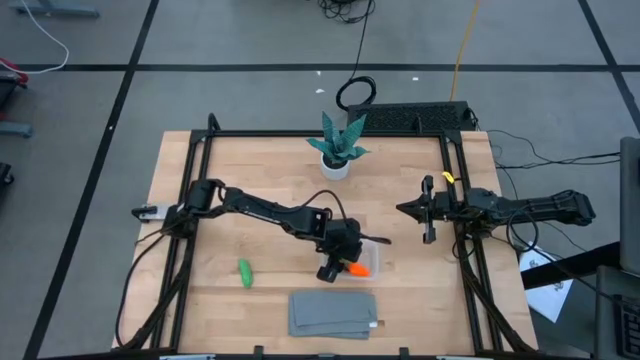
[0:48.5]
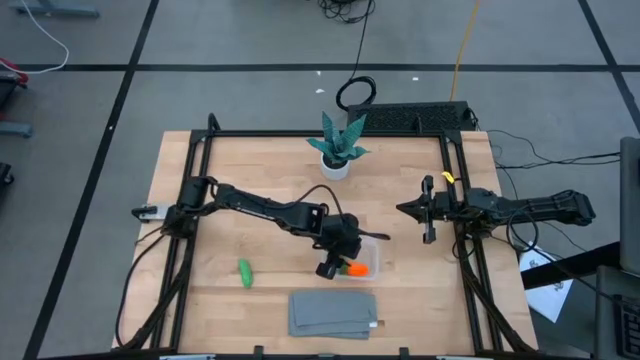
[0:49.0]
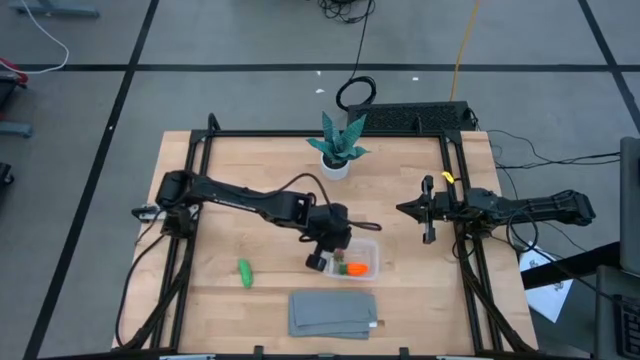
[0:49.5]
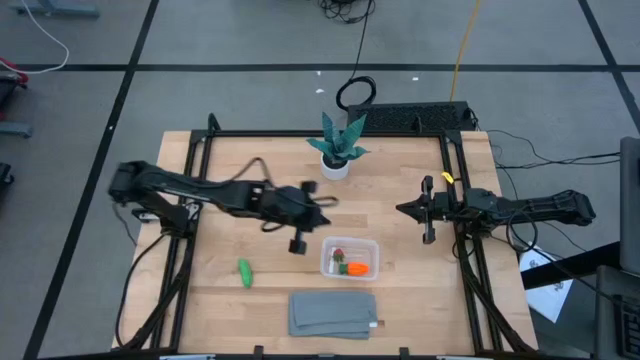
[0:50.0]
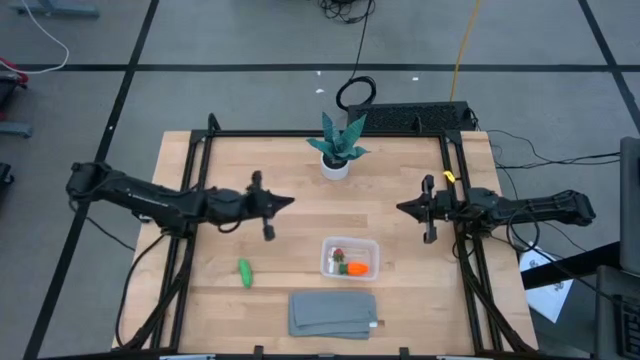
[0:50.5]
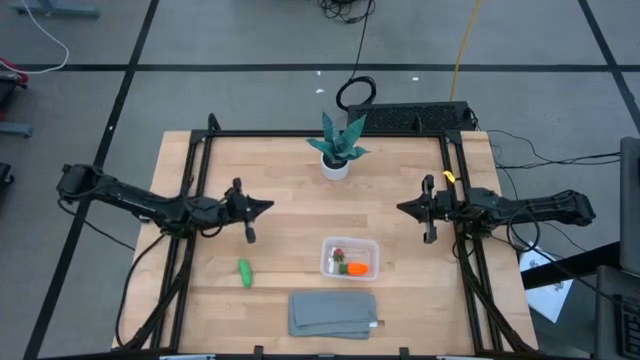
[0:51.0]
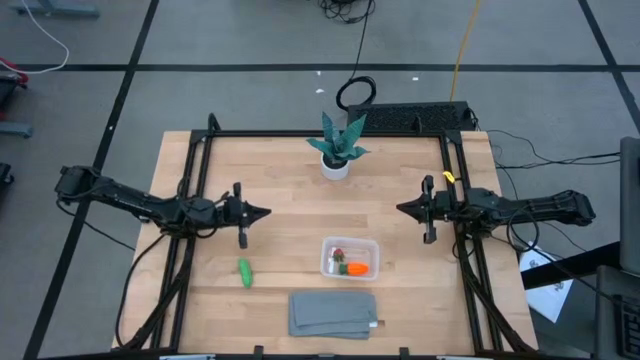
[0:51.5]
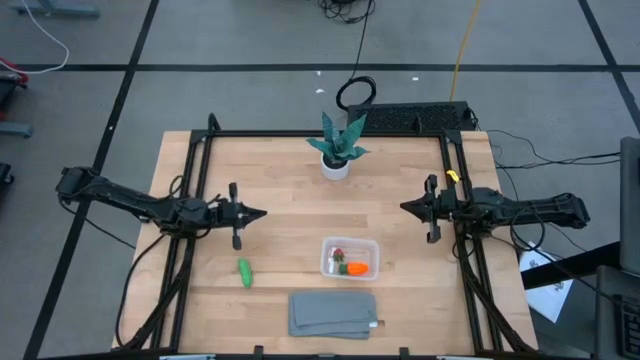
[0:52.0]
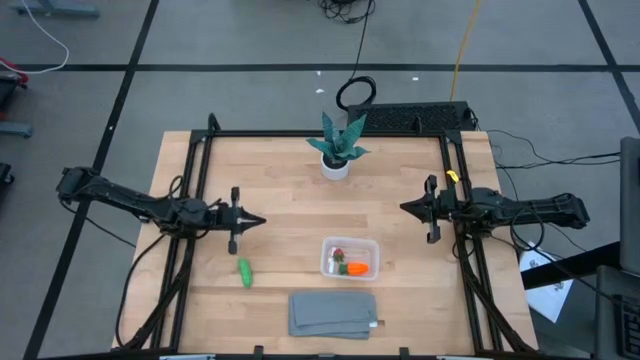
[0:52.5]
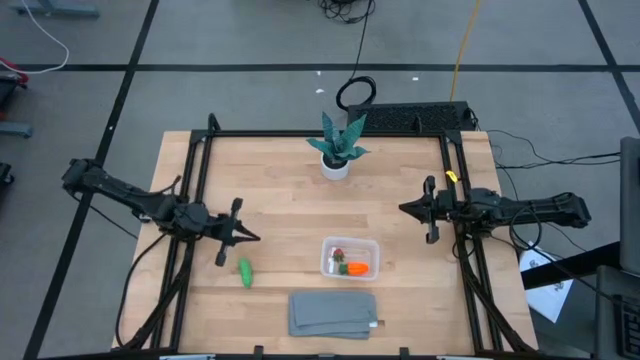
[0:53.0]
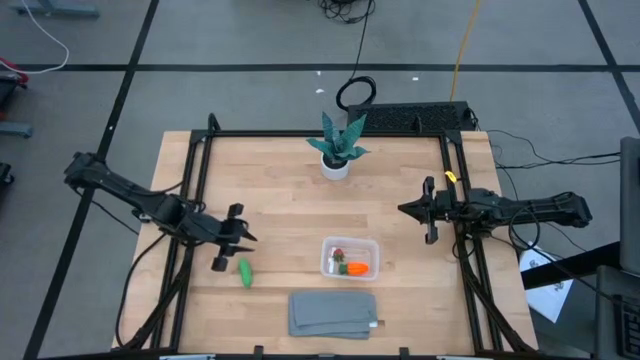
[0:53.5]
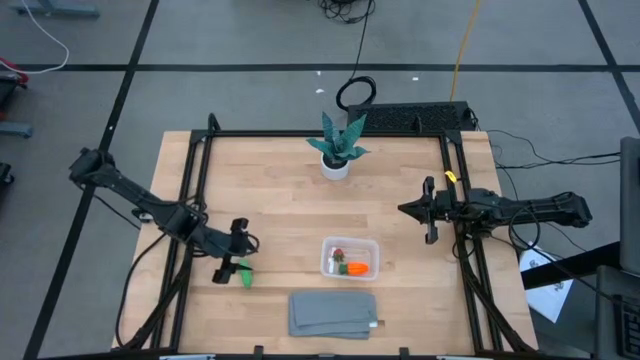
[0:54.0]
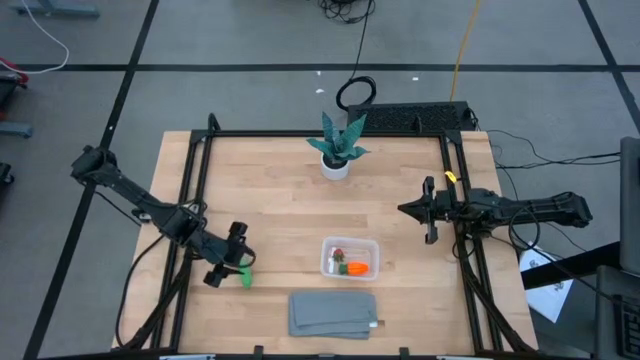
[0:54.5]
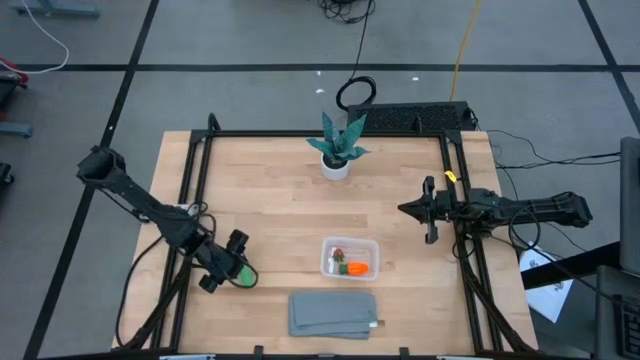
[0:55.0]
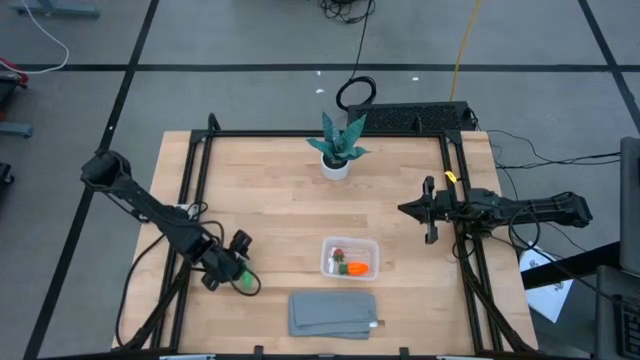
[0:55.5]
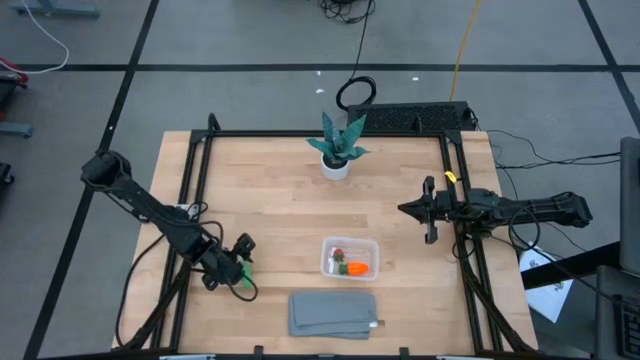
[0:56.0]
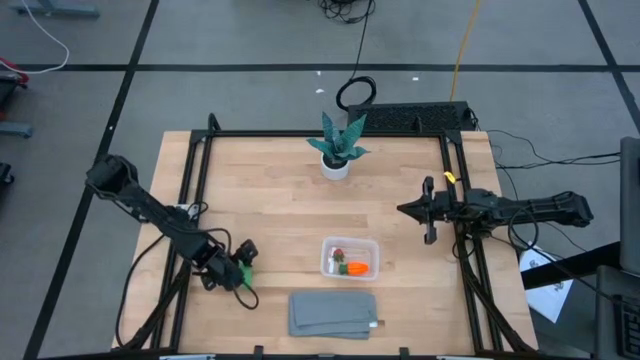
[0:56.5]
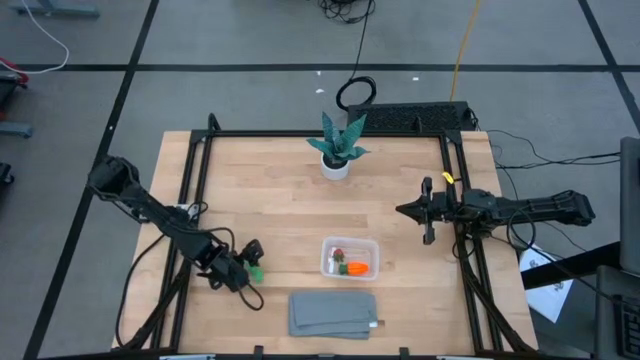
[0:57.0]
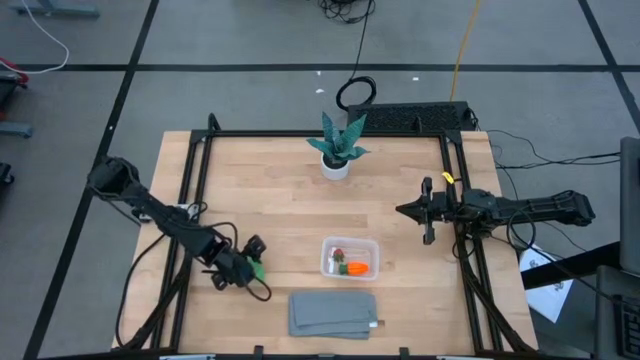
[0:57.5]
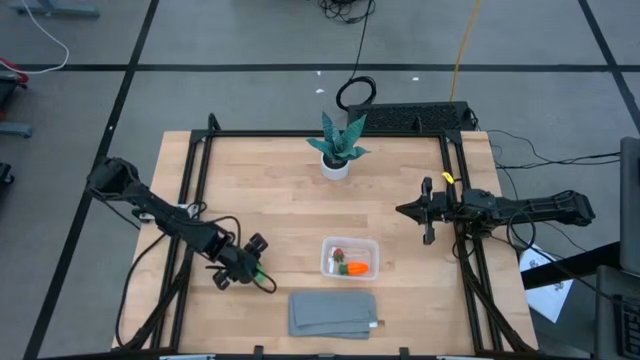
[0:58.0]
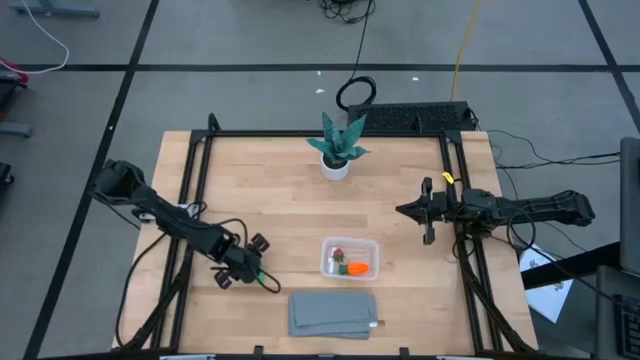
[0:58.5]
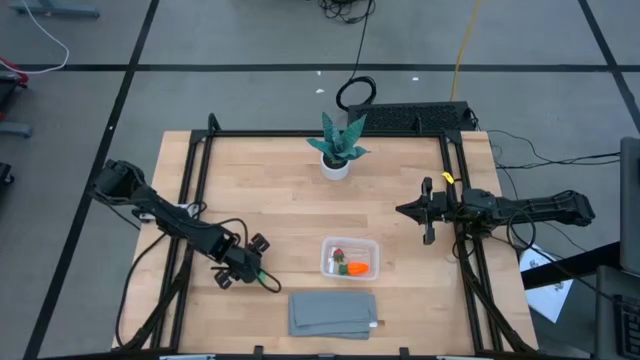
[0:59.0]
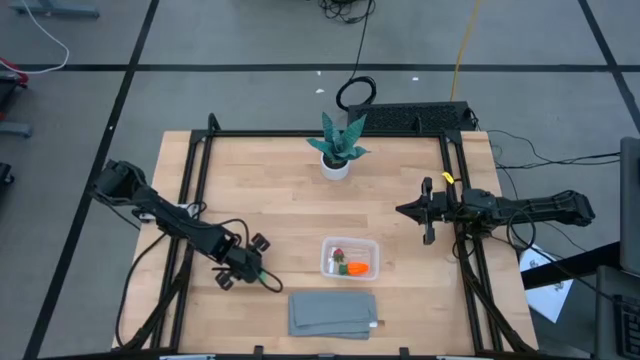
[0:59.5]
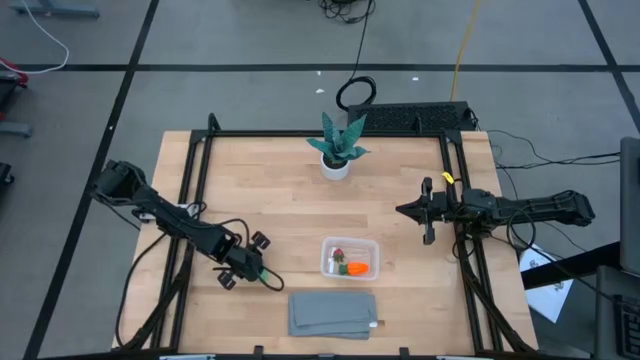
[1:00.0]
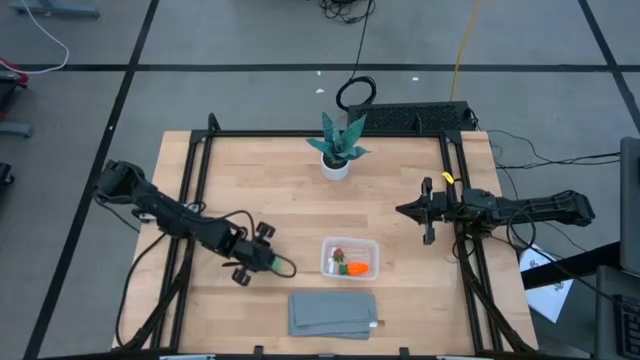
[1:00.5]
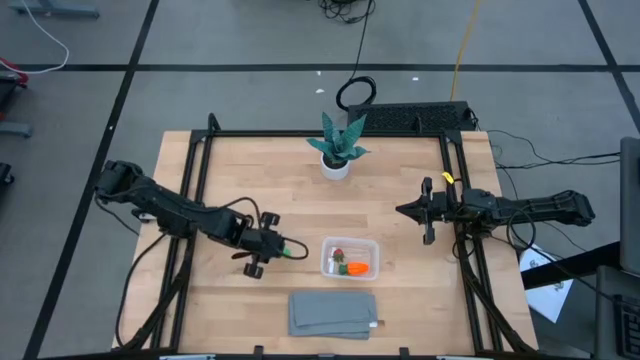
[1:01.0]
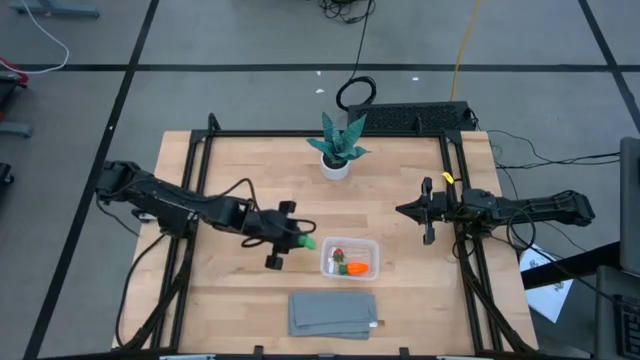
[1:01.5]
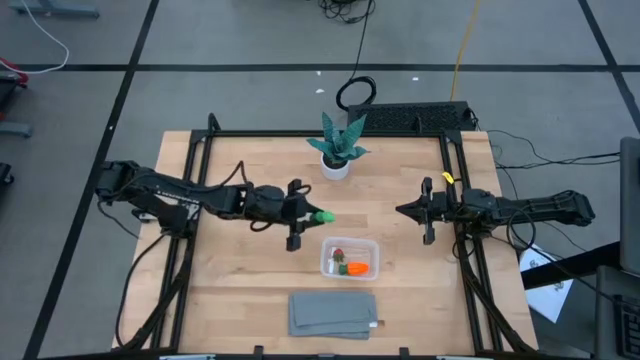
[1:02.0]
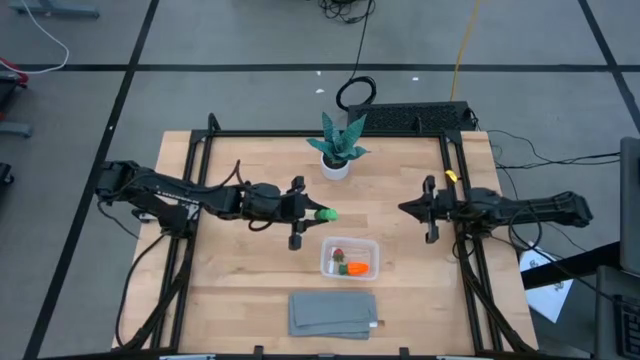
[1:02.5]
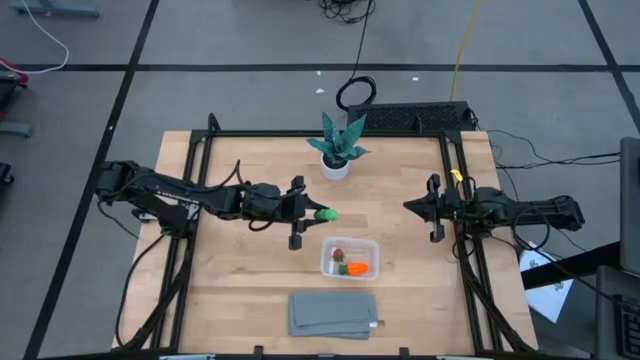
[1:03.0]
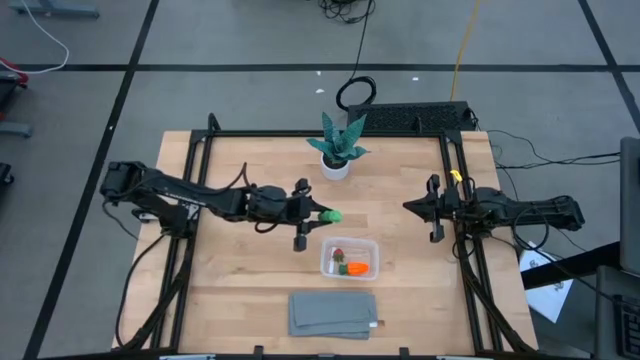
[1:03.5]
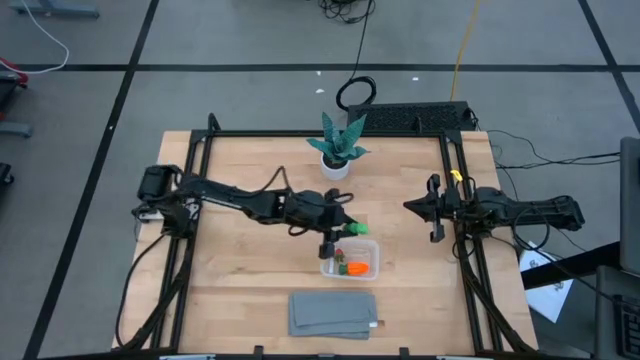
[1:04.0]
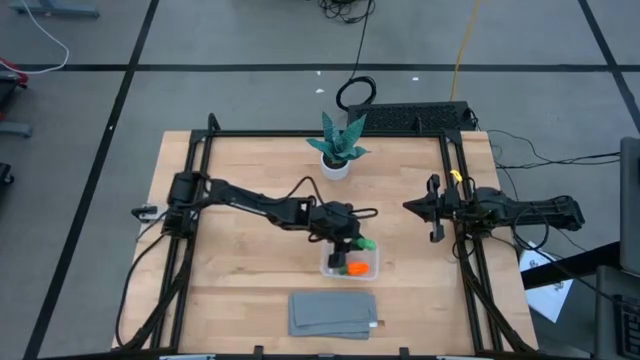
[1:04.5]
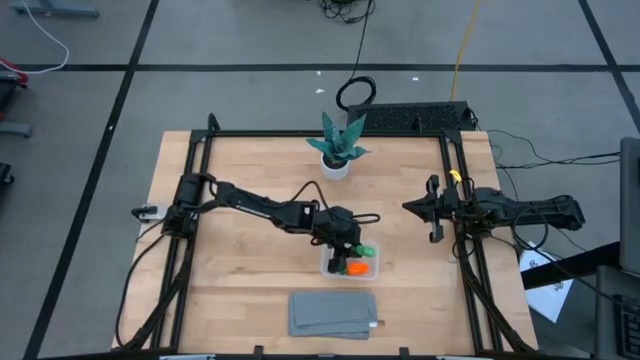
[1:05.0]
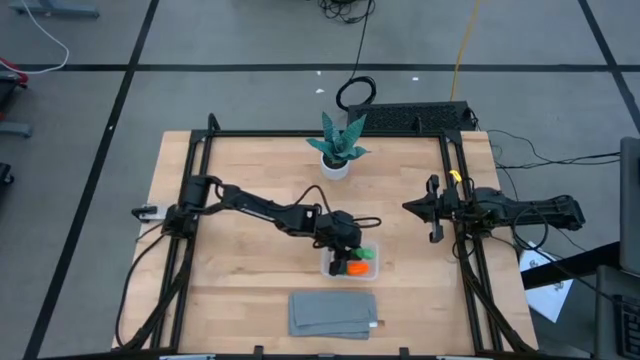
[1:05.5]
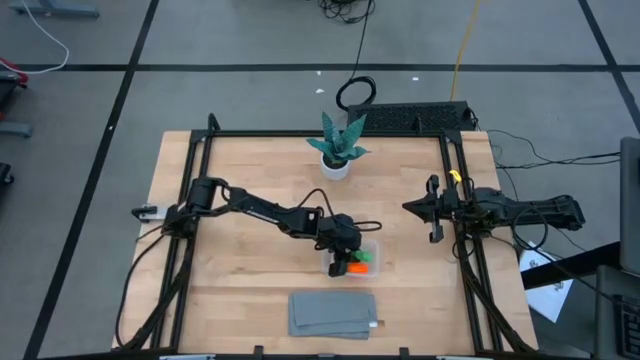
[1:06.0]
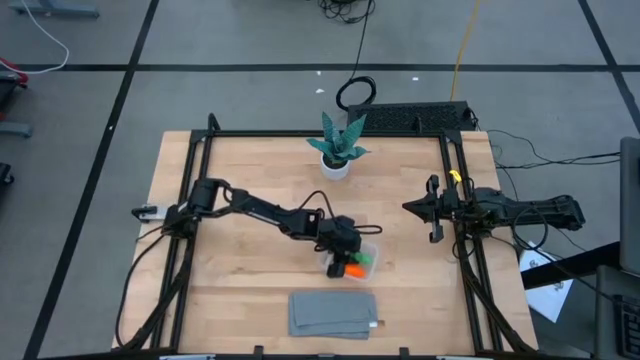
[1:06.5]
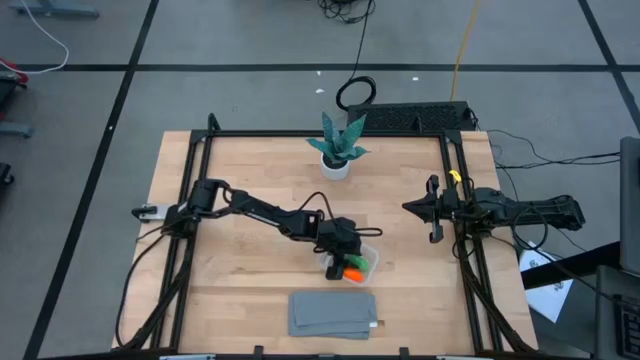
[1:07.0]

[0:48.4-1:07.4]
Task: Pick and placing Produce into tupperware
Put the green peas into the container

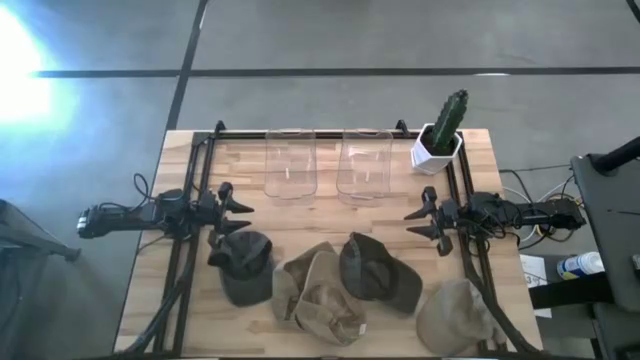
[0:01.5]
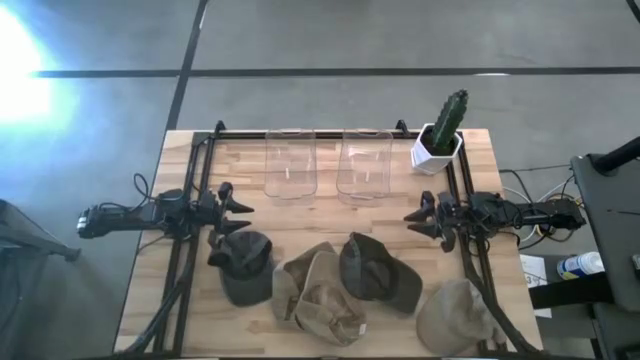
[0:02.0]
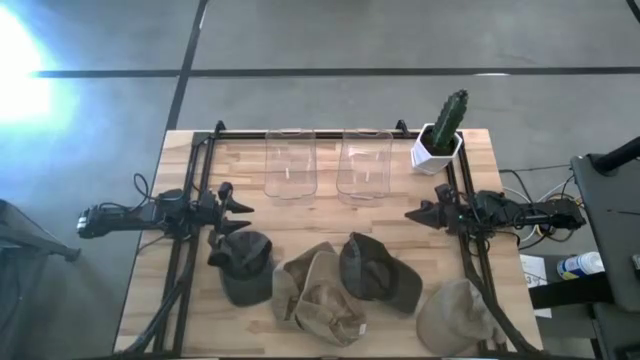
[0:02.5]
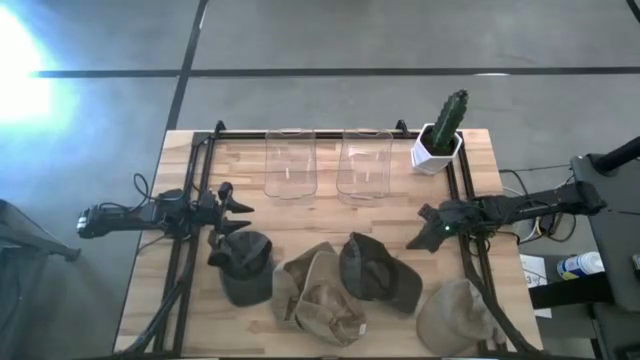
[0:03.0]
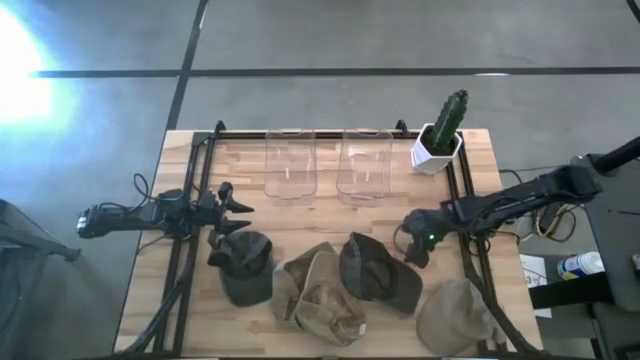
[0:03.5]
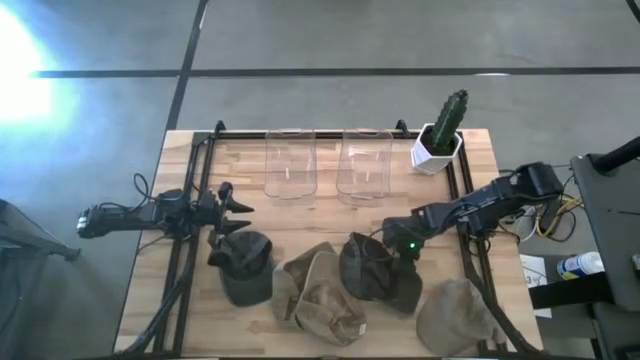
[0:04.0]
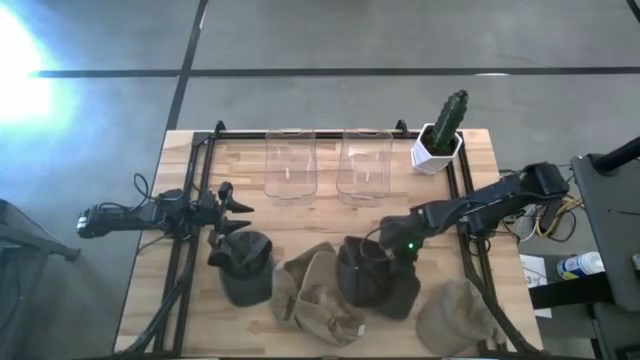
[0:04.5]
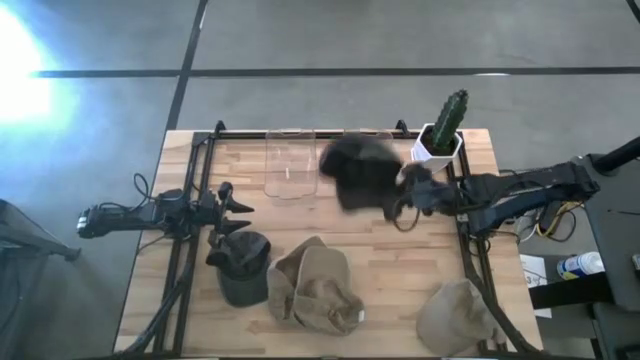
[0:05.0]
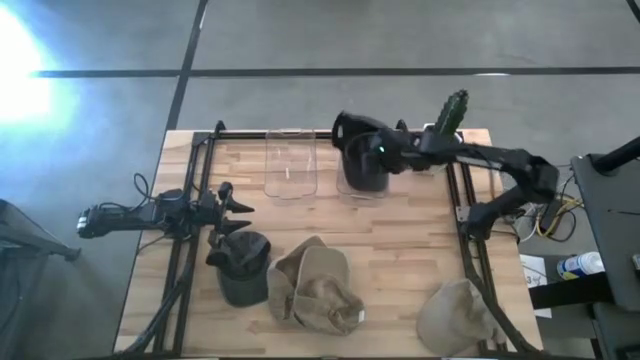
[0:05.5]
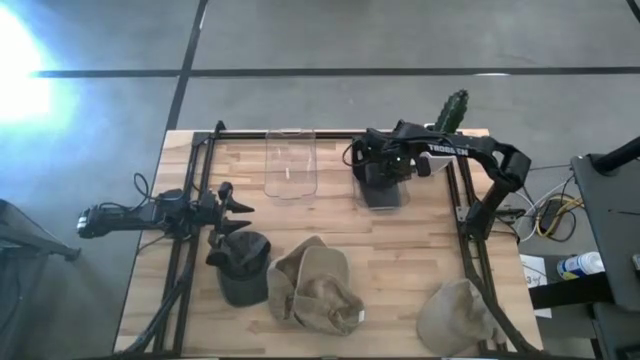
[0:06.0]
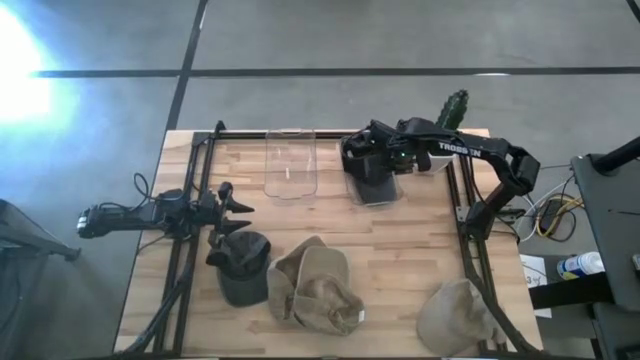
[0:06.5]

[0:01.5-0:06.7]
Task: Pick & Place hat
Put the right black cap into the right transparent bin
